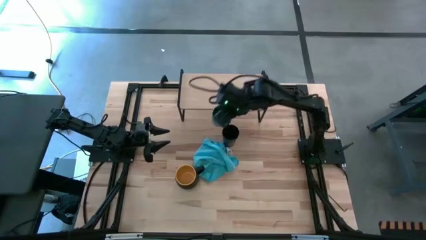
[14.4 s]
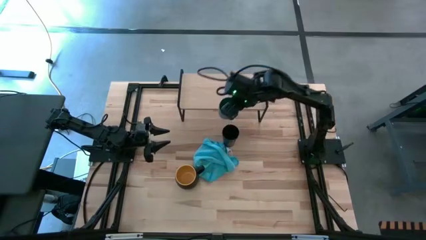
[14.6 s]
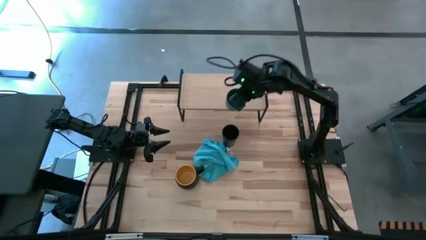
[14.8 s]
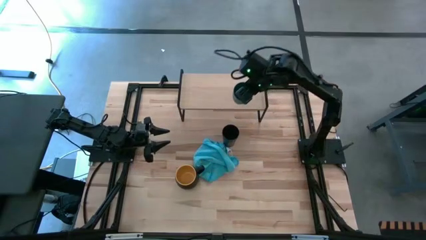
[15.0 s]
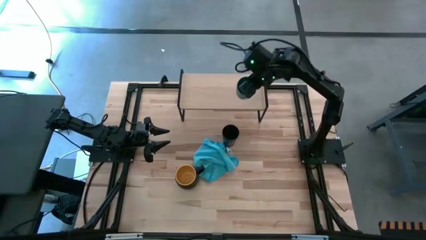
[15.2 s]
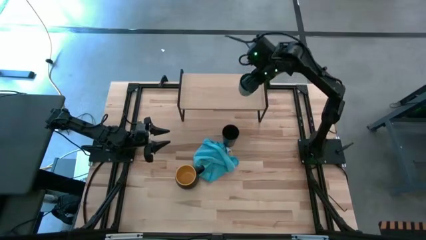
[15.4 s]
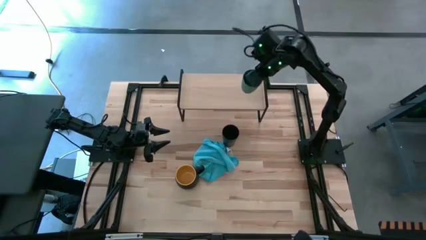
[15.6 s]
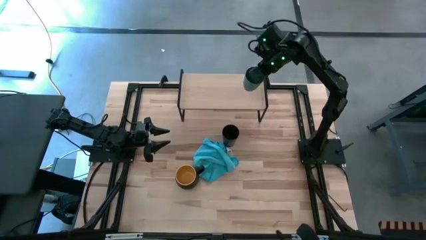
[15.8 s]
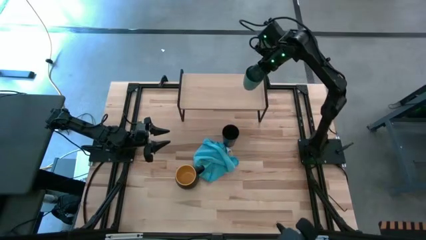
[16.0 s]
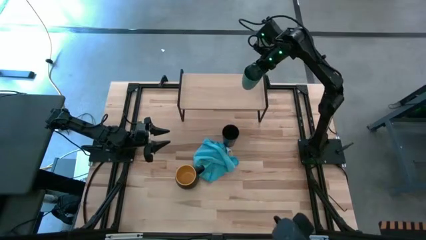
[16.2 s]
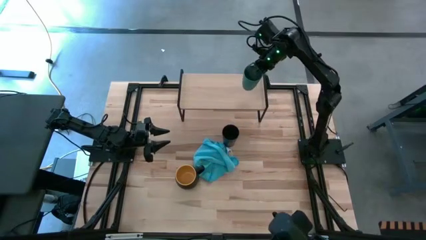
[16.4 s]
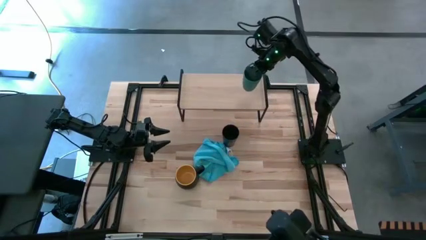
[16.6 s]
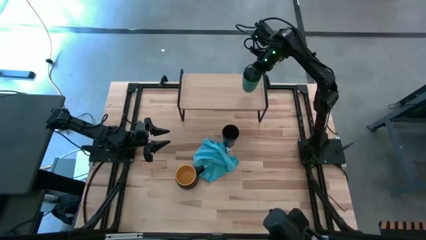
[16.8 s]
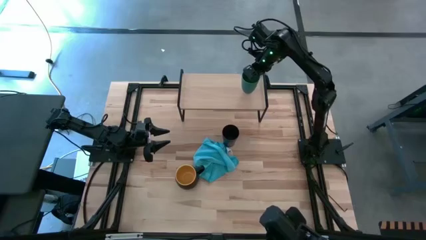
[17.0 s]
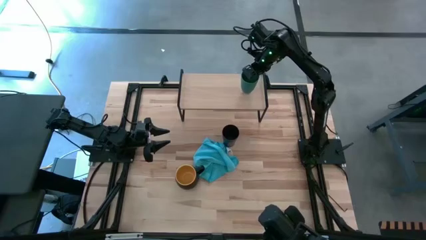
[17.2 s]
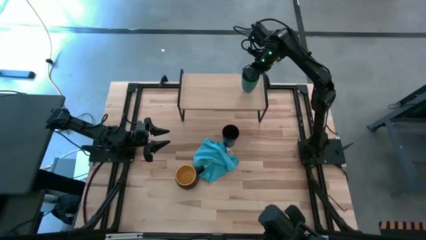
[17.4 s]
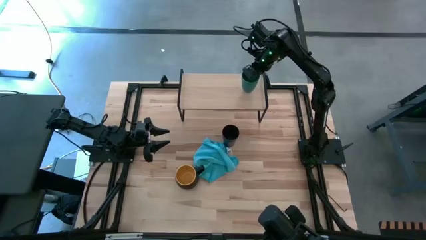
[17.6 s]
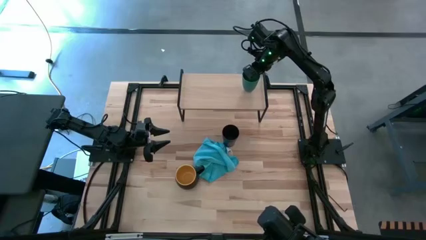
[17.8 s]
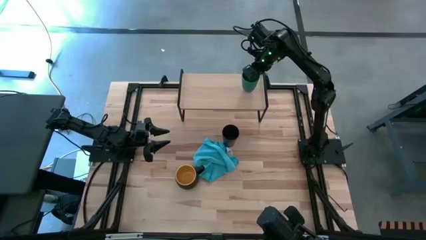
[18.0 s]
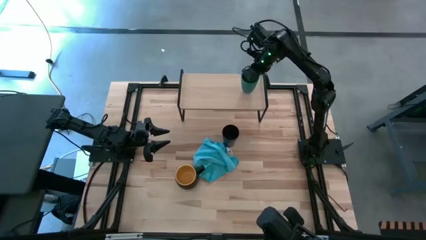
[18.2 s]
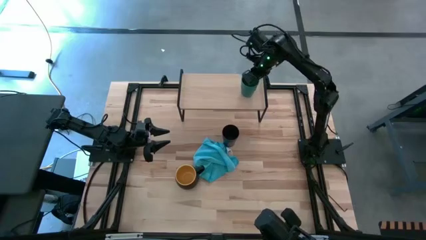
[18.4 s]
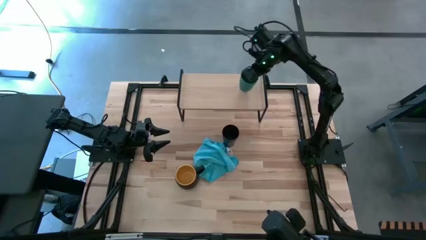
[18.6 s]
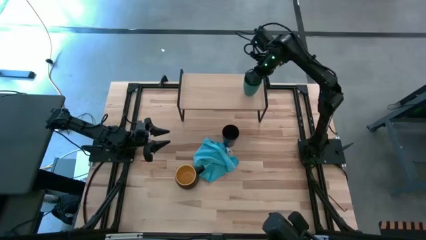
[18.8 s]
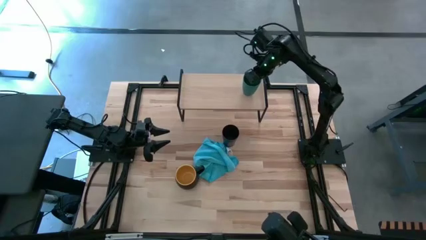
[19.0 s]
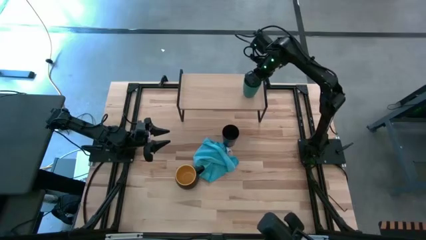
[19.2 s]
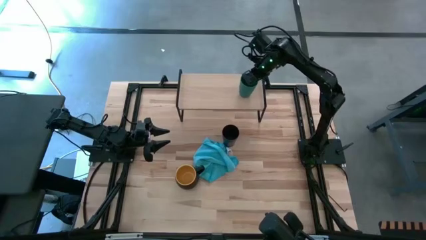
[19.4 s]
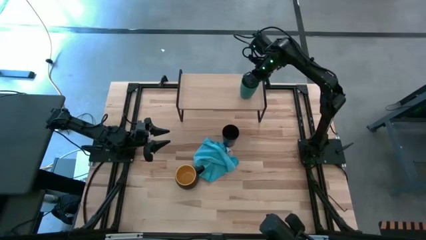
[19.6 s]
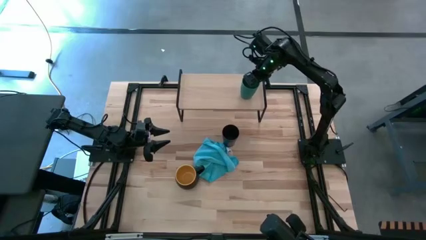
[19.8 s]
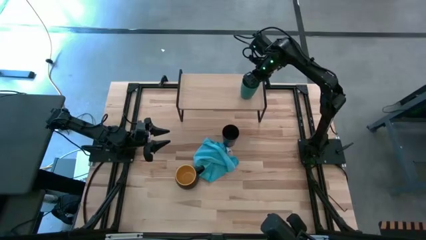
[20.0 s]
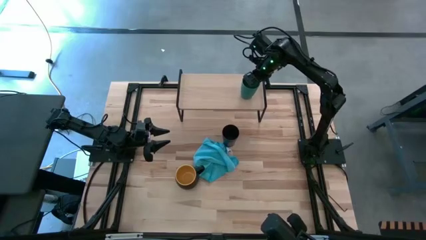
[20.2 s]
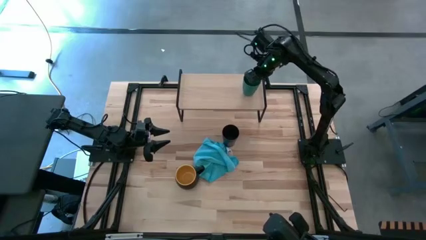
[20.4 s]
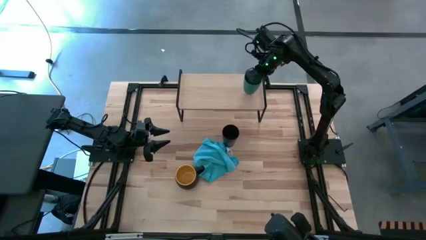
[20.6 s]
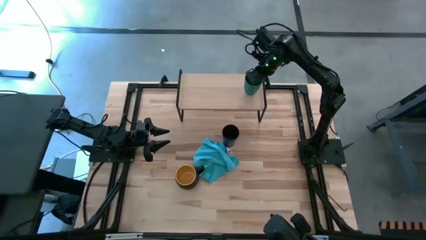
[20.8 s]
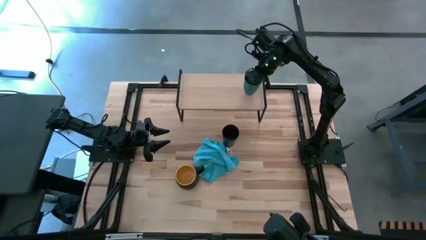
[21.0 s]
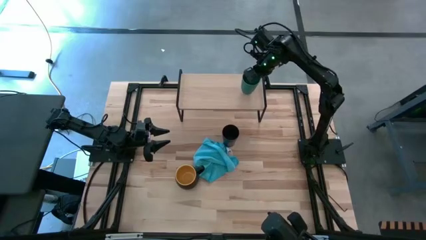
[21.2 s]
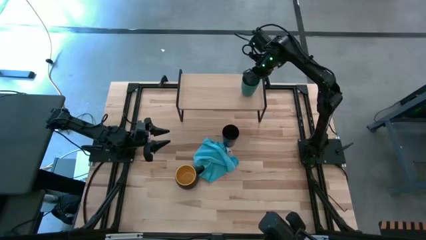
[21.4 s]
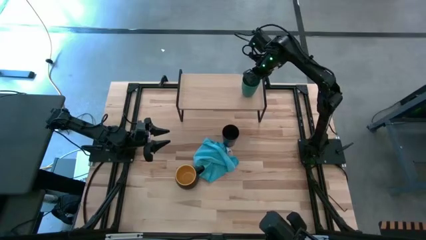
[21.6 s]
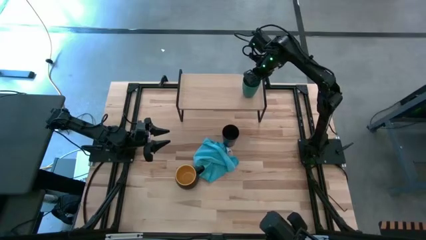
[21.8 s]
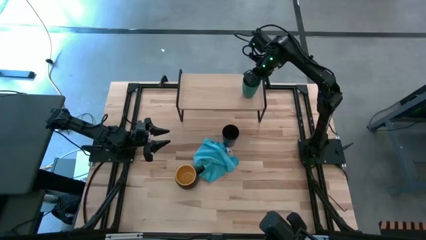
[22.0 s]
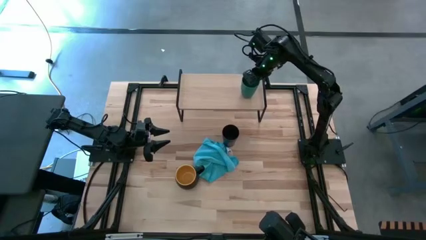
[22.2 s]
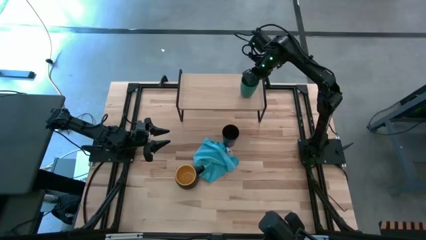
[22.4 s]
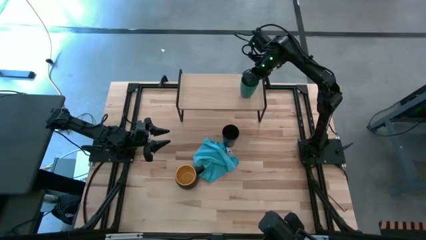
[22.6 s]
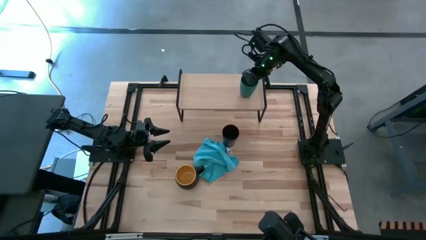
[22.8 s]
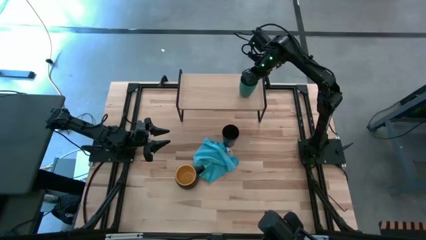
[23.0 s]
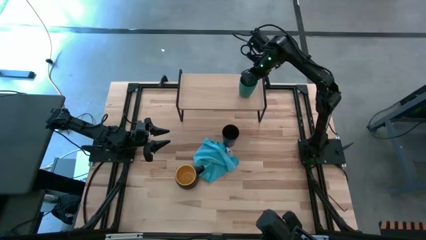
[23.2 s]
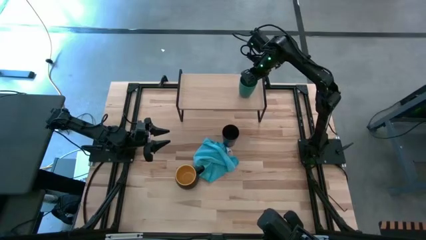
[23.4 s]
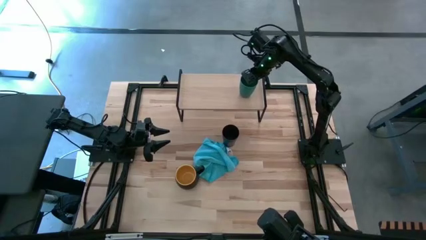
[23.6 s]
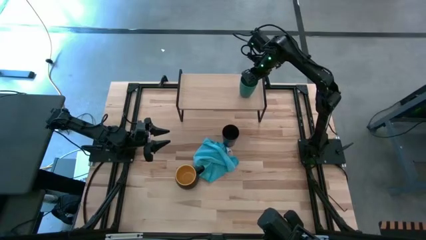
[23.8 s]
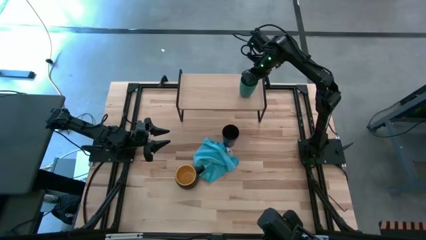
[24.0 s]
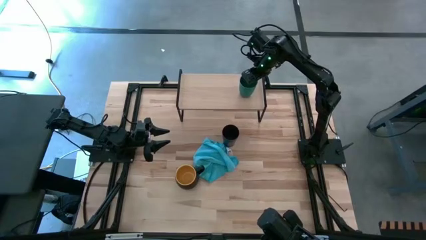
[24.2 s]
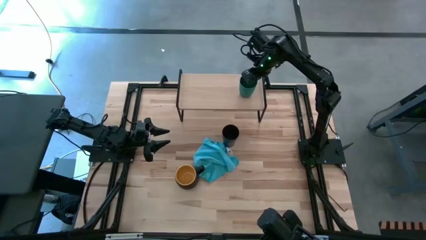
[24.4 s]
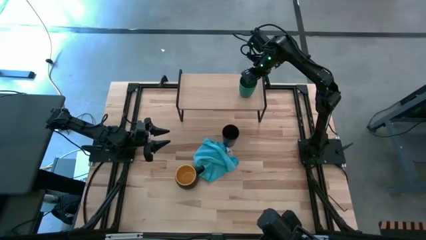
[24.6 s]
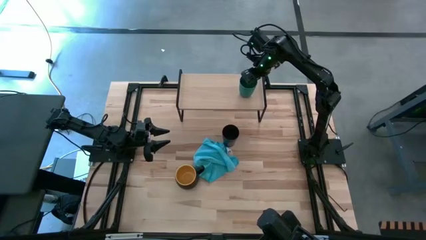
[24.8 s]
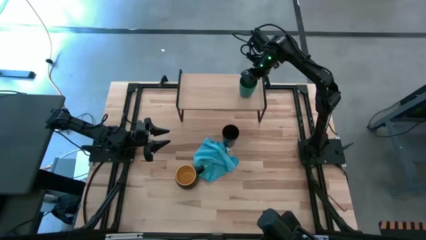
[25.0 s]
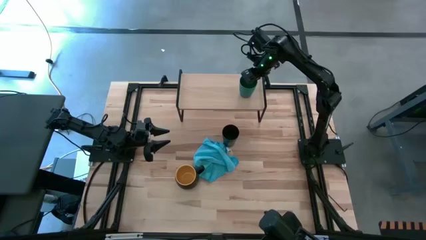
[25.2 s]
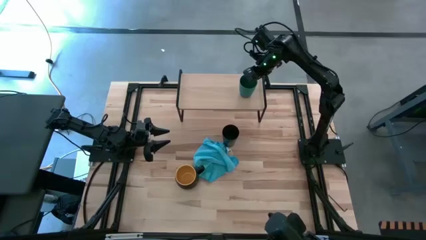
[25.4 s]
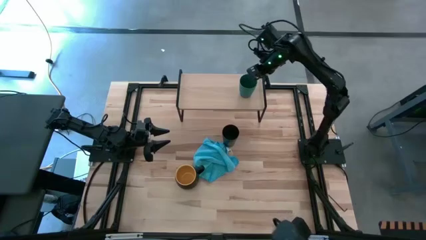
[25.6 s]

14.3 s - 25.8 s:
Task: Stack small to large cups/mugs on shelf
Put the green cup on the shelf
